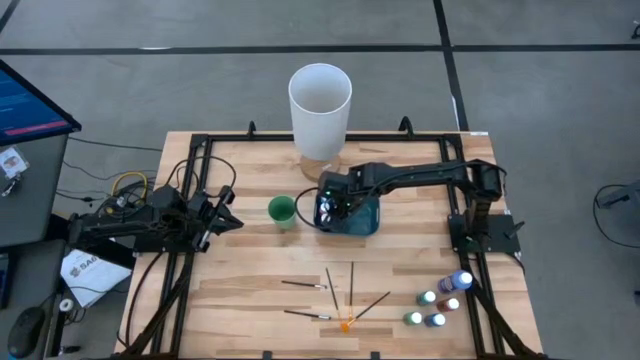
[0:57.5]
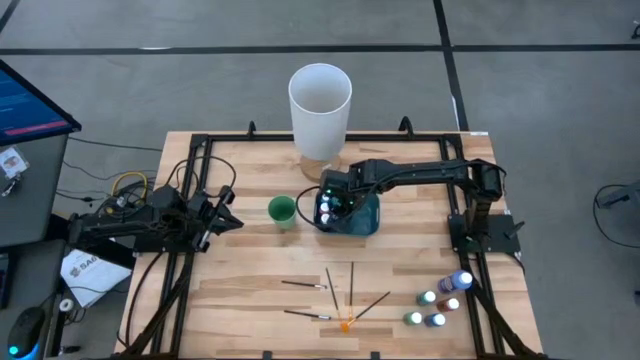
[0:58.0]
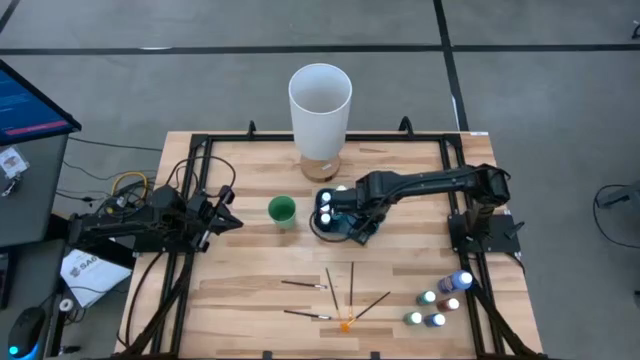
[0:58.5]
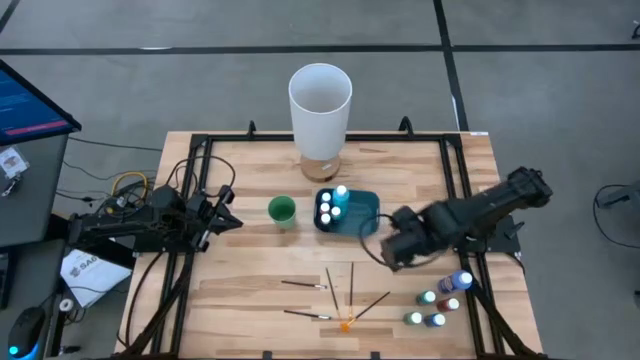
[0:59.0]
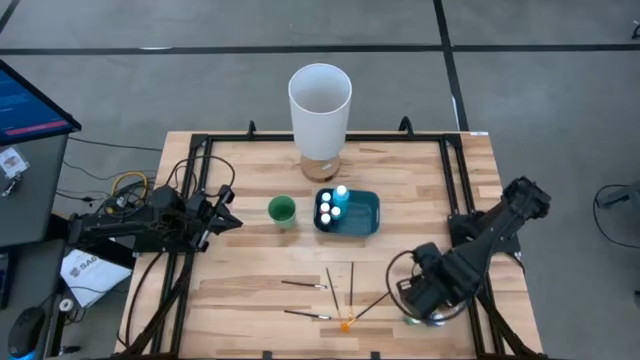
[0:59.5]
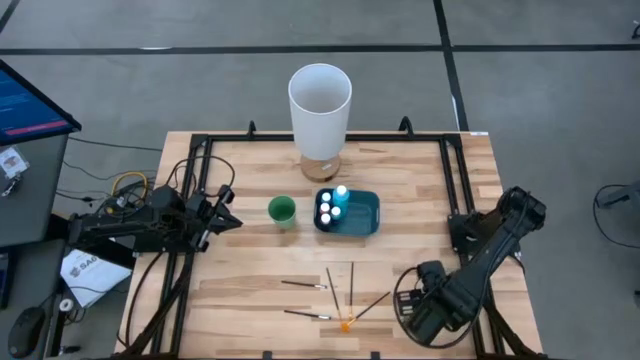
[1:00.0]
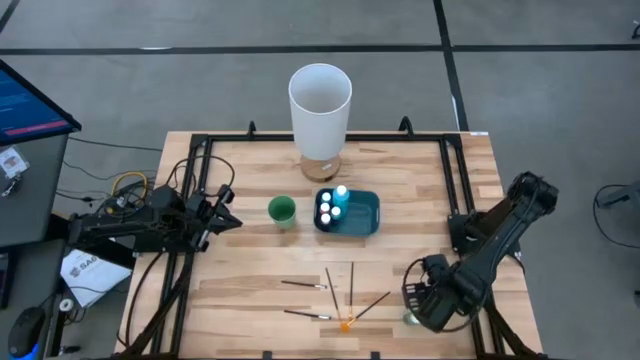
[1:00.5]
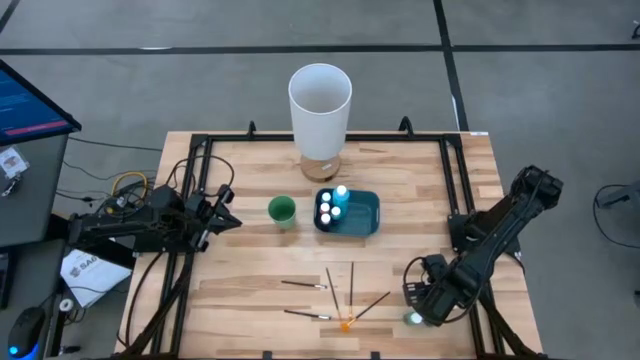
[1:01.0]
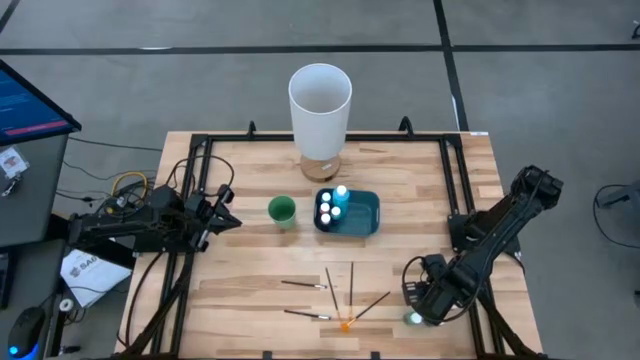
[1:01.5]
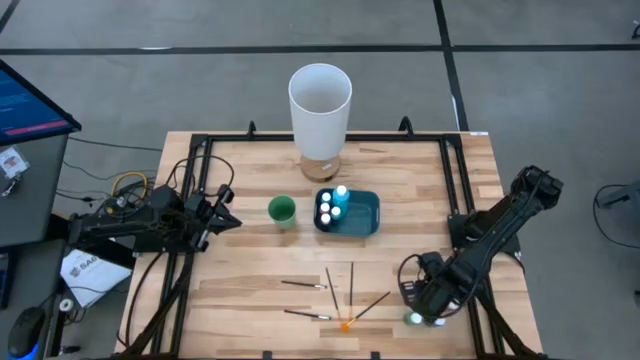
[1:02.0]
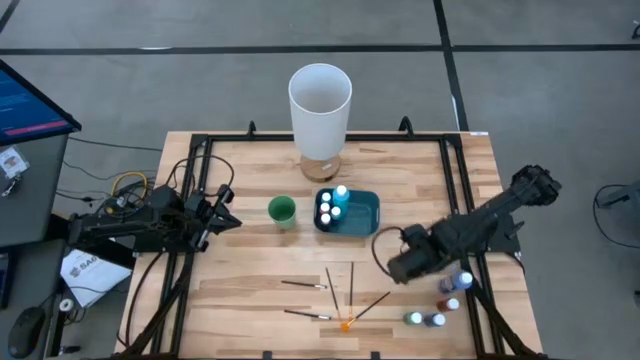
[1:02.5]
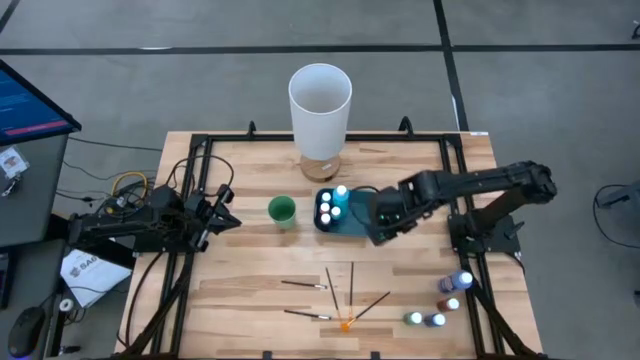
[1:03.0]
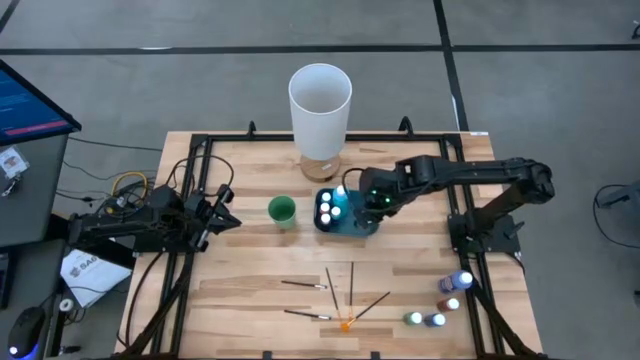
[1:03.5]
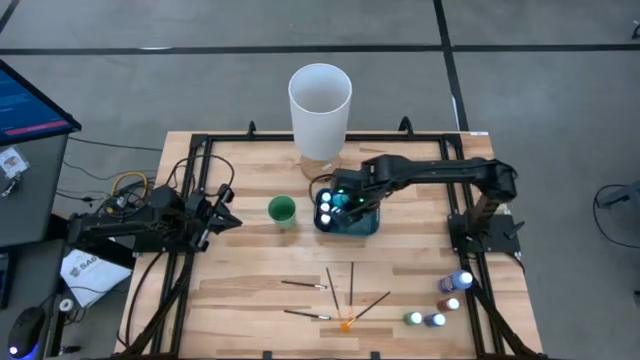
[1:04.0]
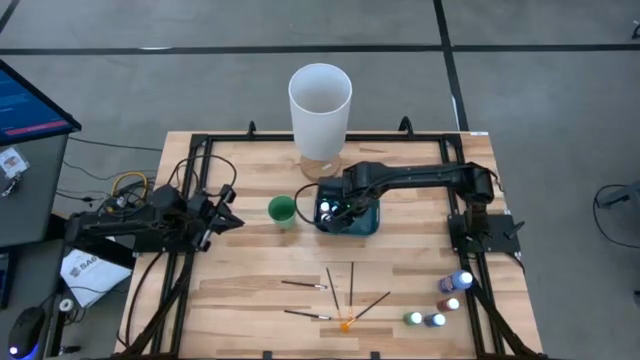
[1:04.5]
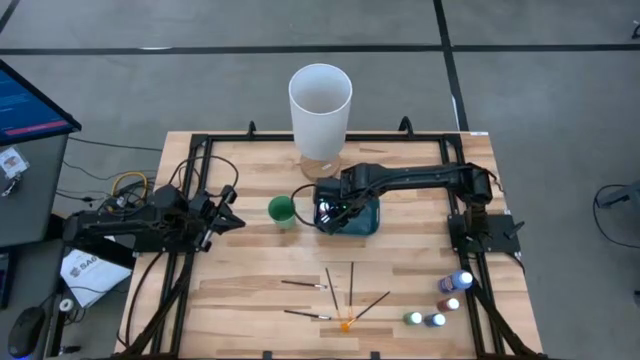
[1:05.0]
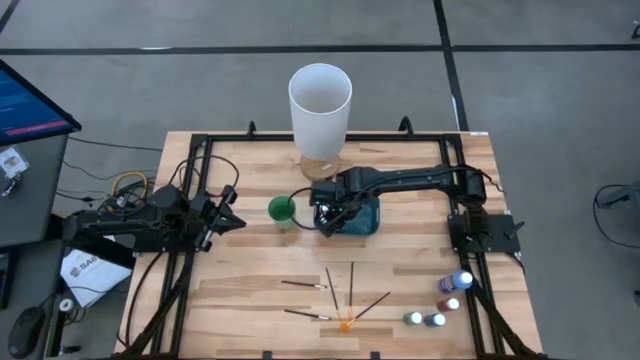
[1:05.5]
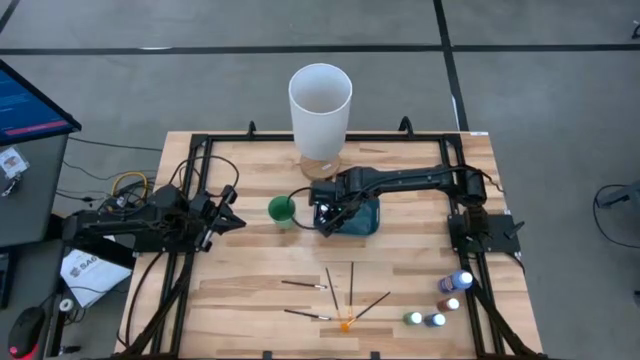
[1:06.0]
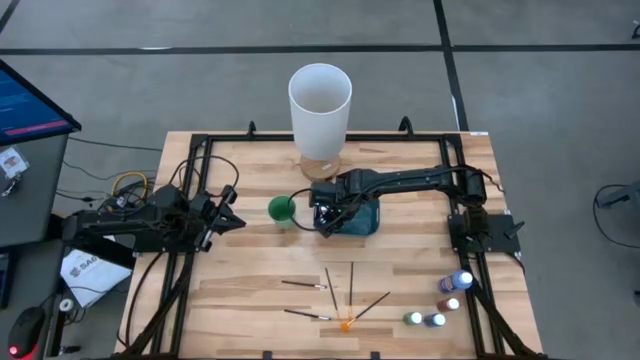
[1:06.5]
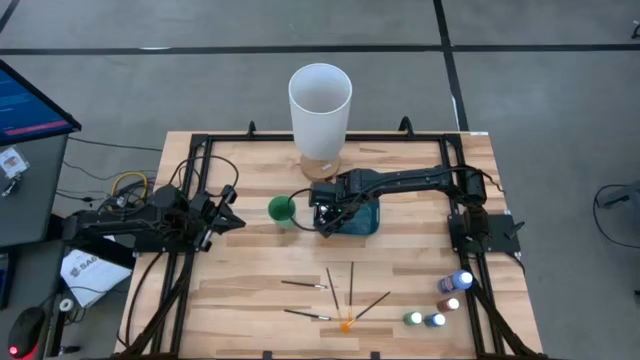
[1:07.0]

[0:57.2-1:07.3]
Task: Pick & Place Paint Supplies
Put the small light green paint bottle into the green bin

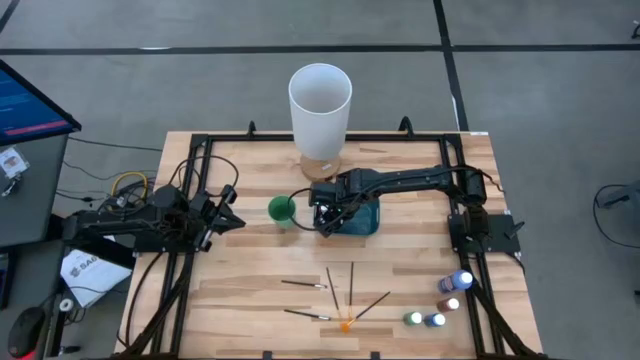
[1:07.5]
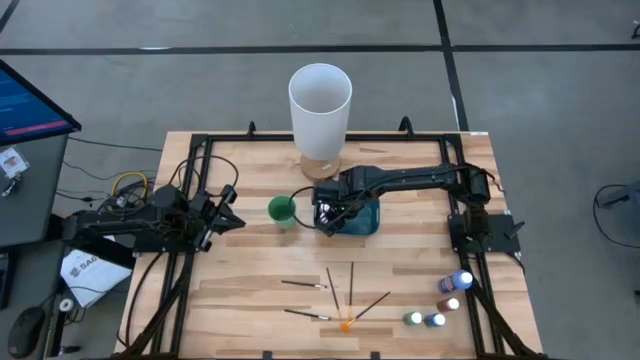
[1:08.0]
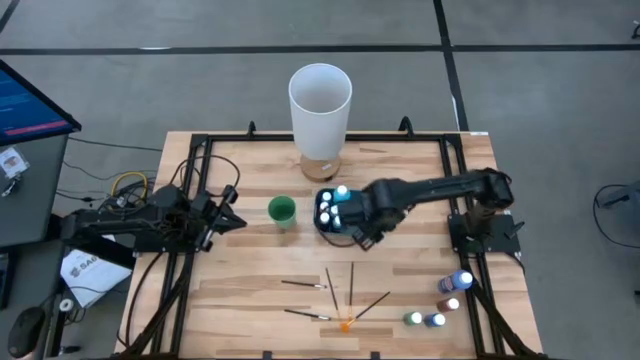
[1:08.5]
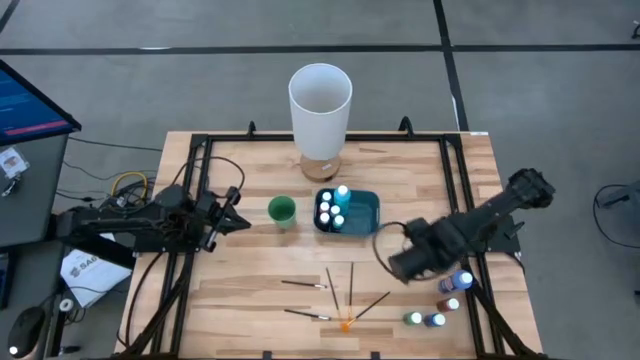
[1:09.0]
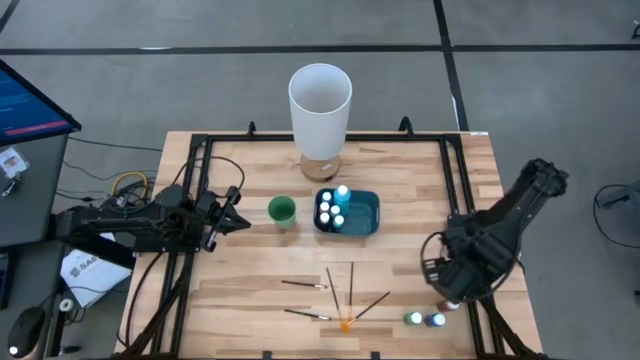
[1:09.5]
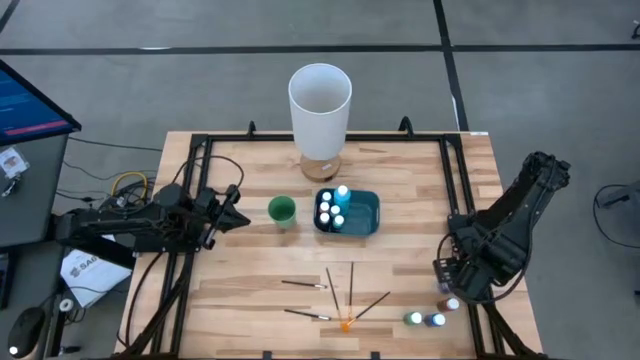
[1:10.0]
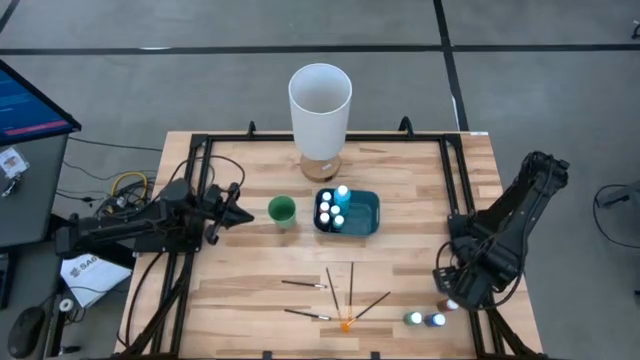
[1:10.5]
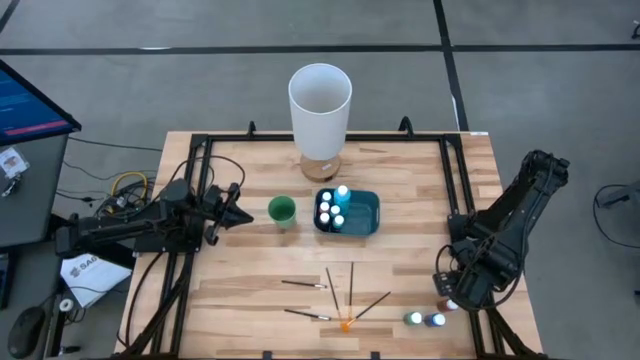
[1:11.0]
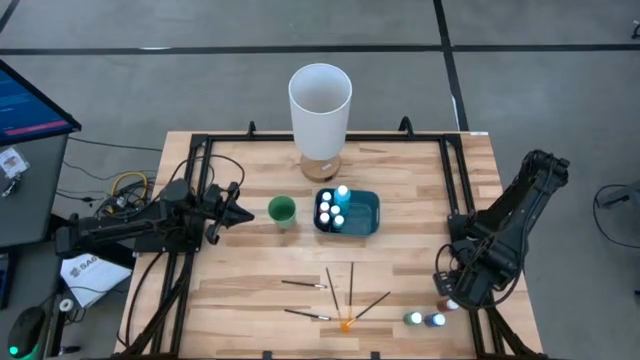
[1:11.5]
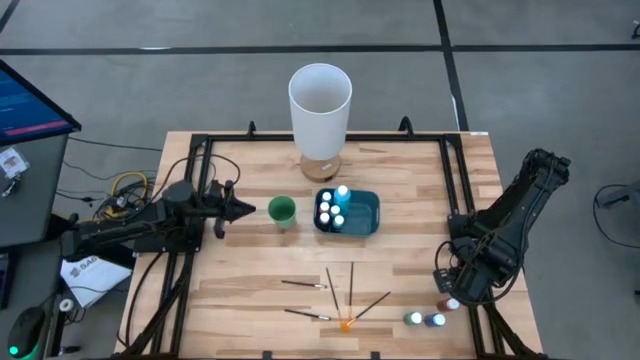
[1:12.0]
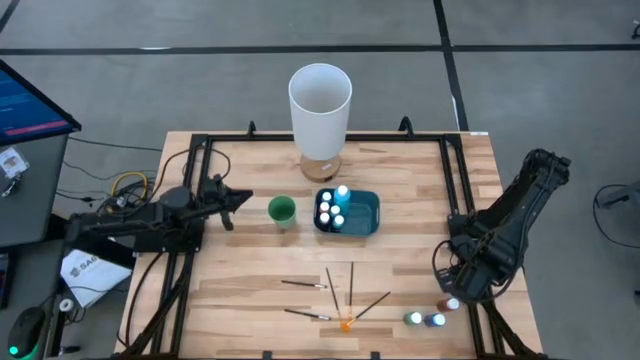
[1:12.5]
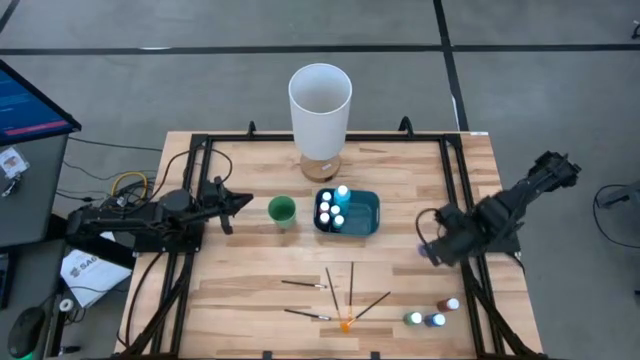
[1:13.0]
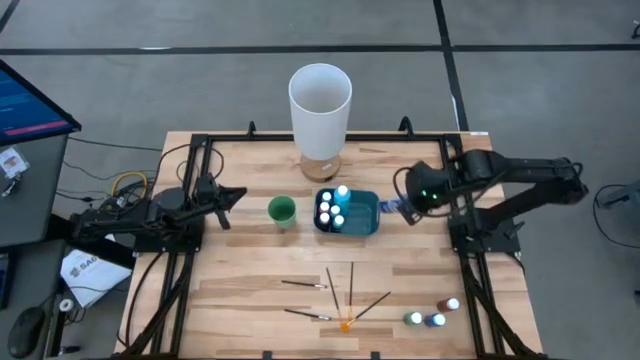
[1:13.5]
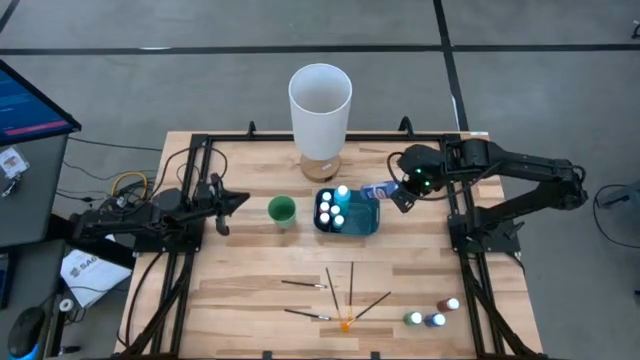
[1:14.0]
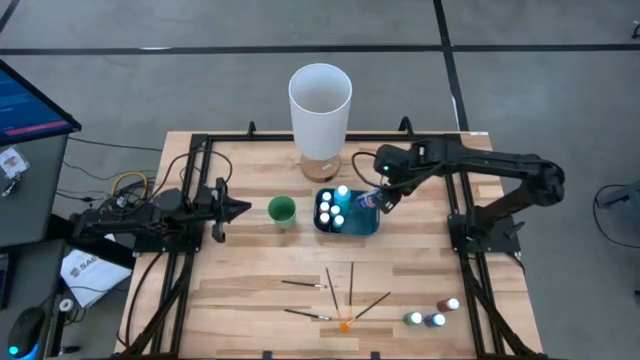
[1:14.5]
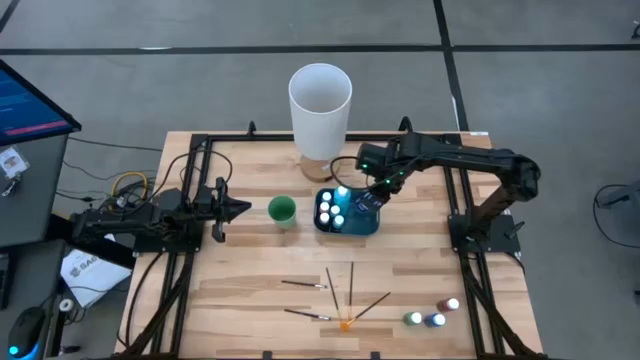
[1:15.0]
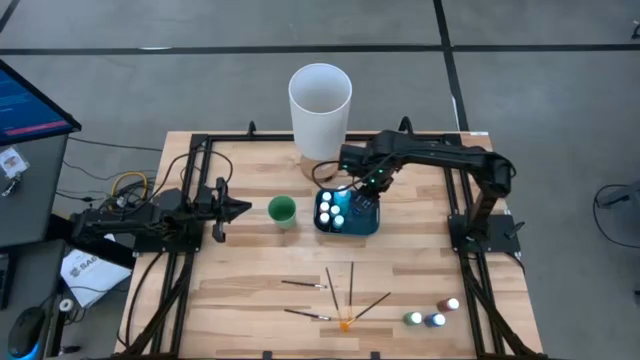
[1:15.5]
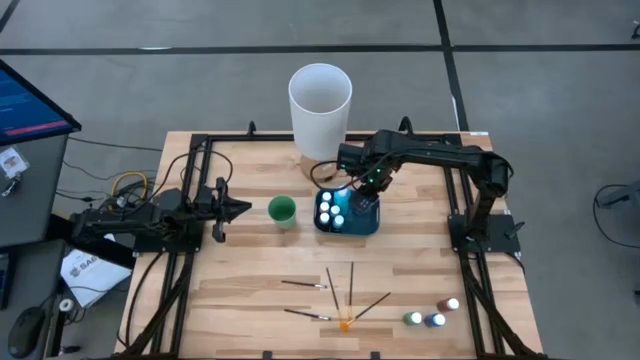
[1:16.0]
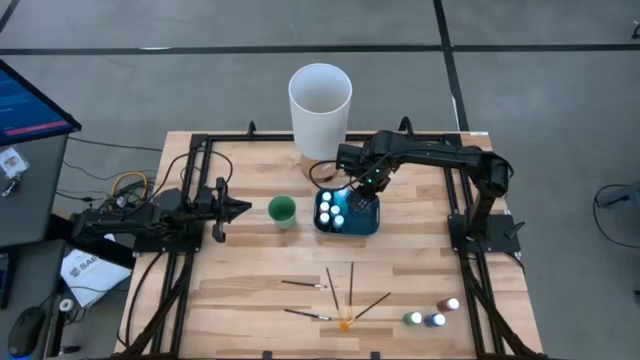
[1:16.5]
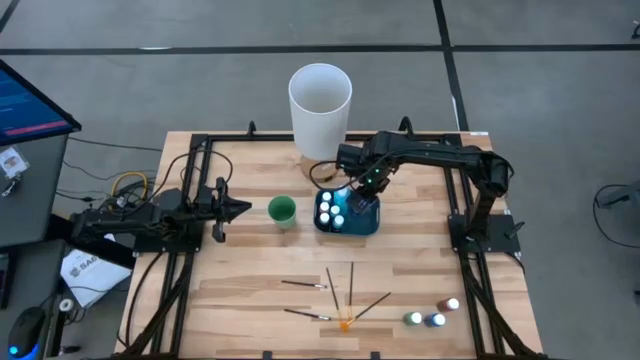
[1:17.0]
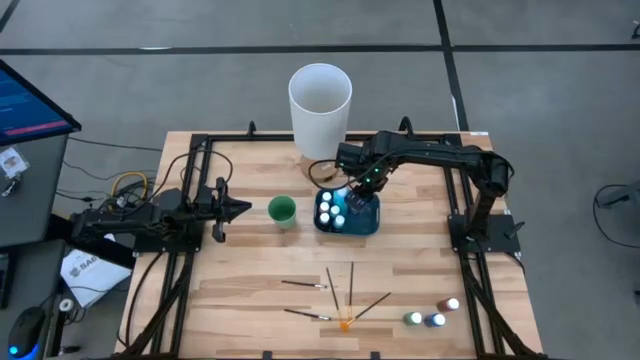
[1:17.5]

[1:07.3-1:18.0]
Put the large purple paint bottle into the green bin

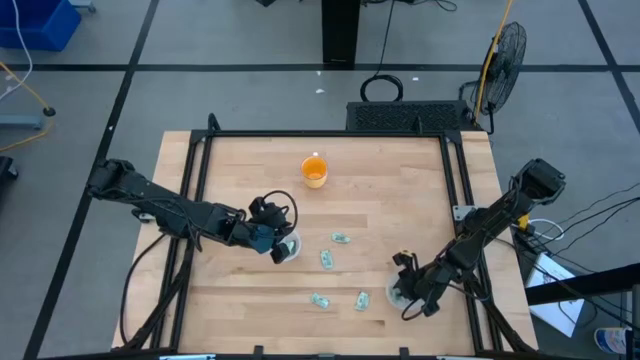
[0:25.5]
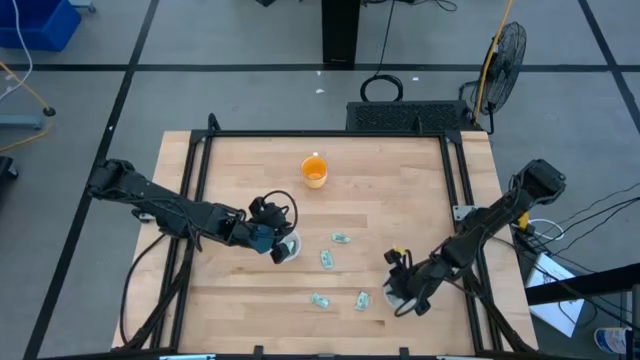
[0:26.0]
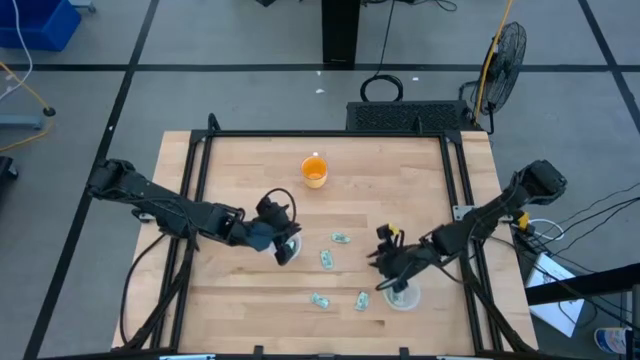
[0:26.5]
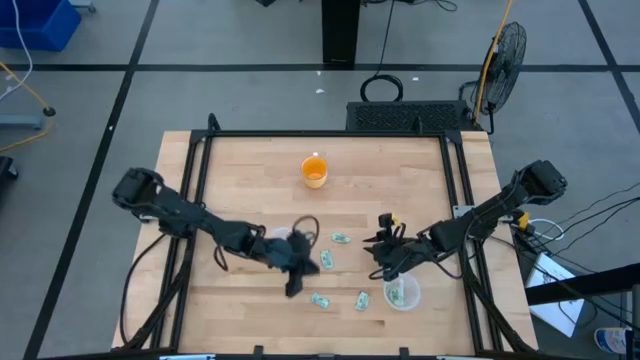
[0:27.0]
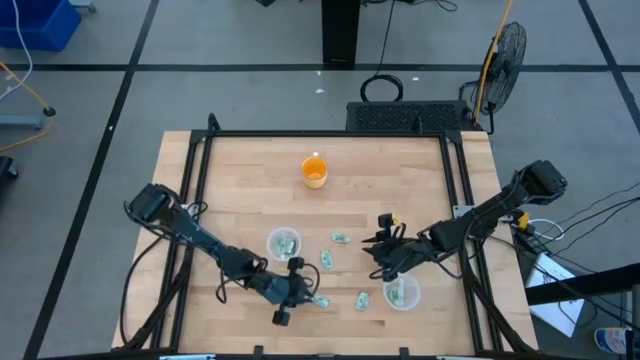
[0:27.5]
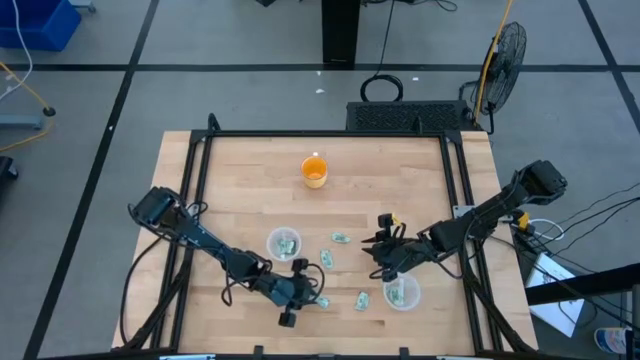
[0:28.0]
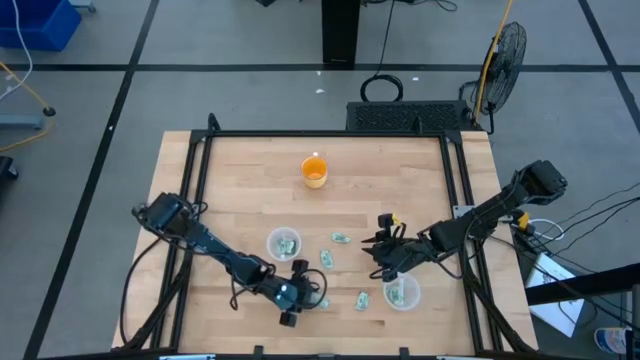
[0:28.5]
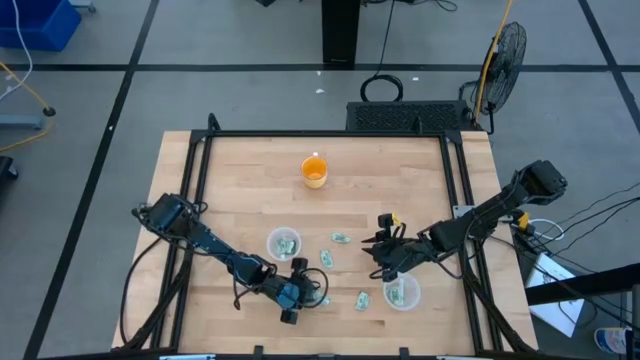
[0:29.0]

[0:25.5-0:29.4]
Task: Pick and place Stevia / Truvia into bins
Put the white stevia packet into the top transparent container
